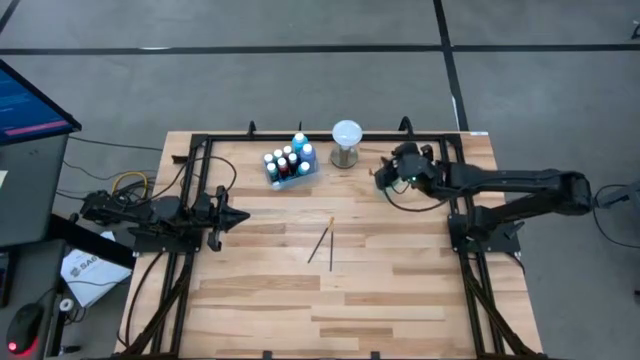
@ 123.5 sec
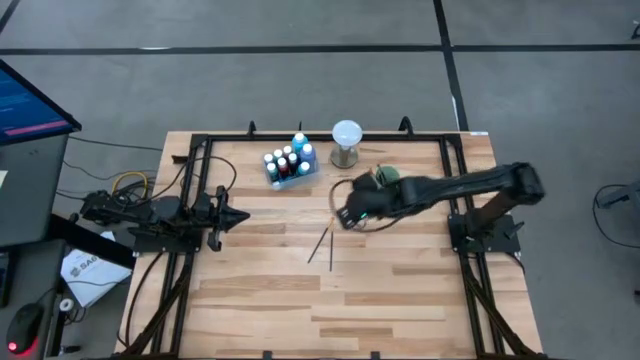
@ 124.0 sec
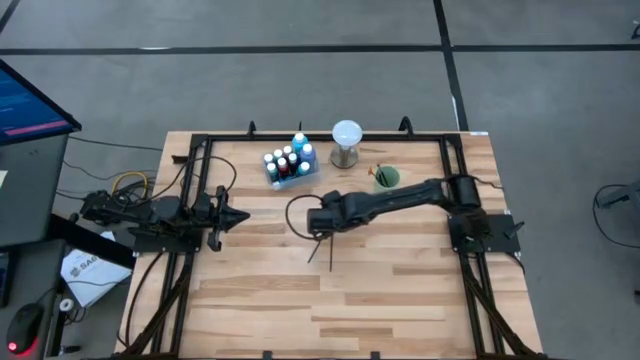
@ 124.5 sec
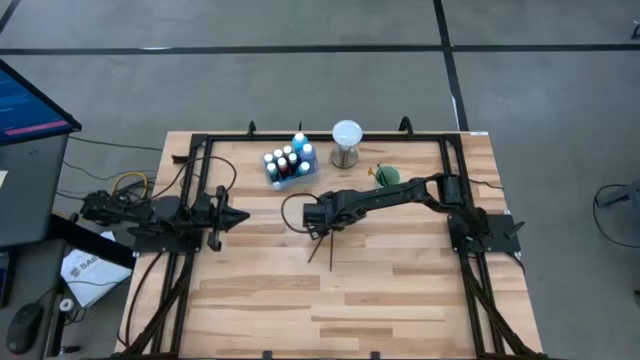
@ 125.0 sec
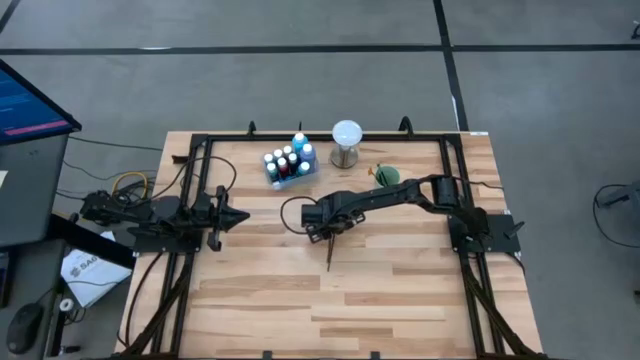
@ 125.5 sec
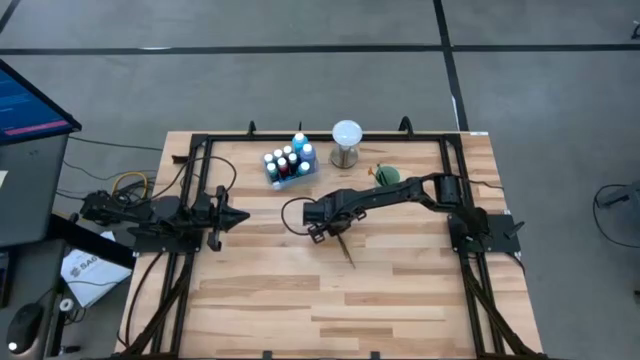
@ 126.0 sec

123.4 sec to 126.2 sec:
Task: Pick & Place Paint Supplies
Put the left gold paint brush into the cup

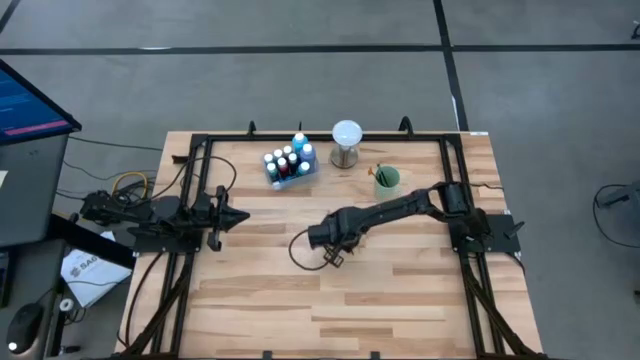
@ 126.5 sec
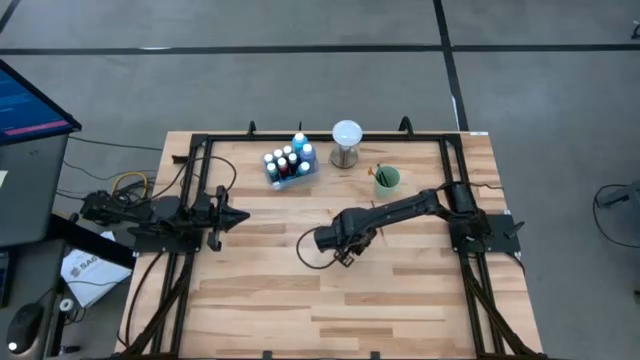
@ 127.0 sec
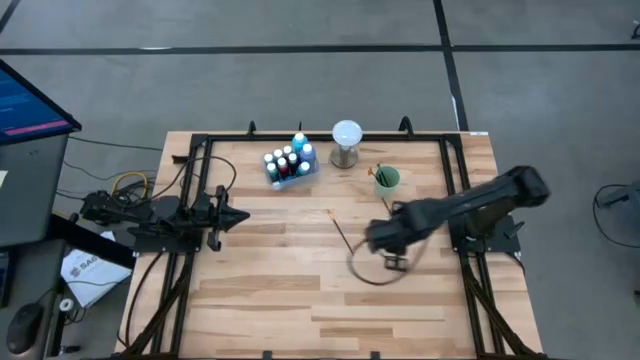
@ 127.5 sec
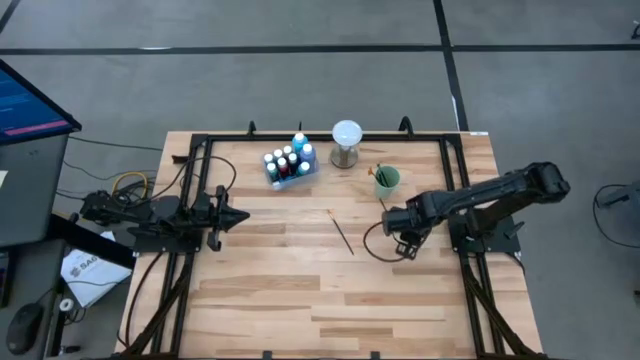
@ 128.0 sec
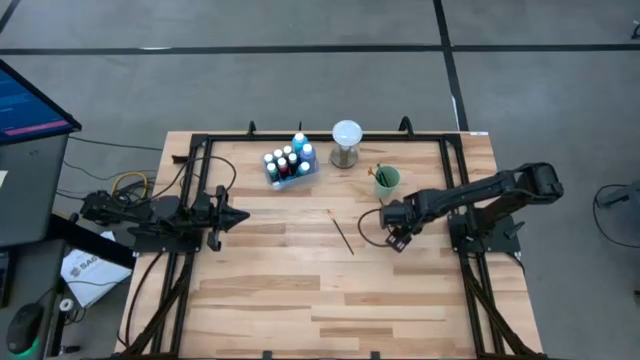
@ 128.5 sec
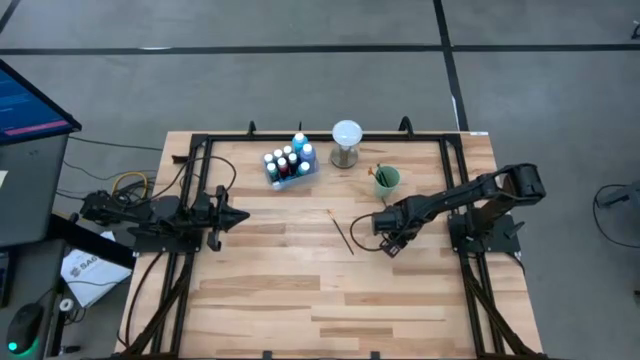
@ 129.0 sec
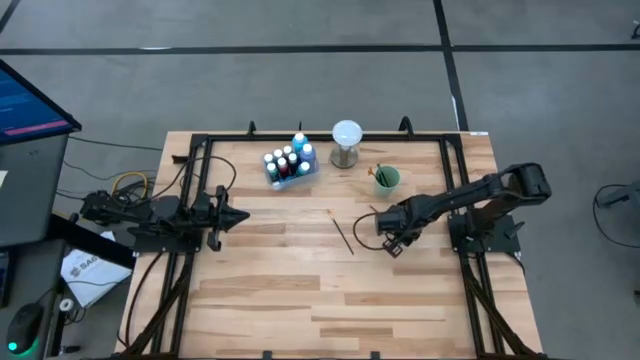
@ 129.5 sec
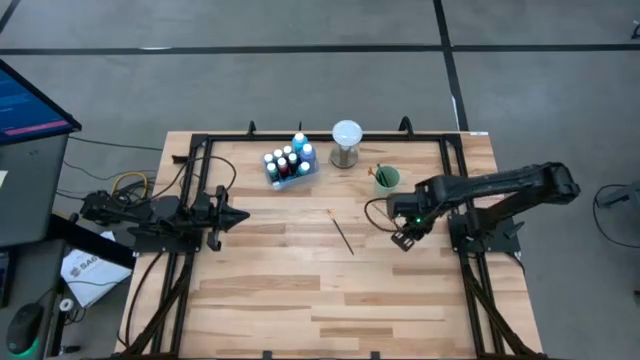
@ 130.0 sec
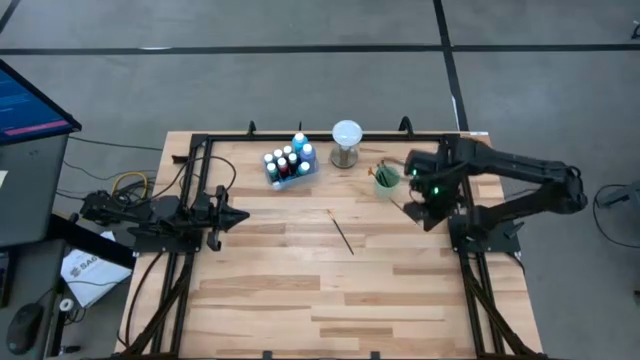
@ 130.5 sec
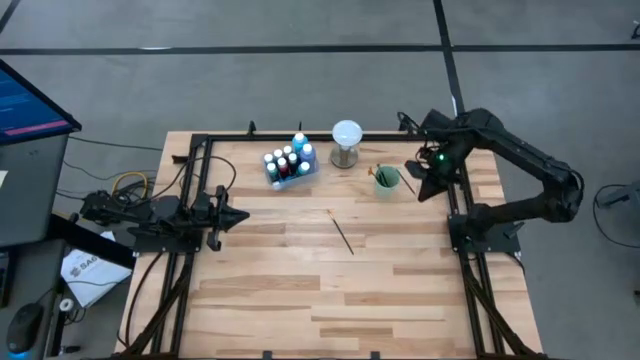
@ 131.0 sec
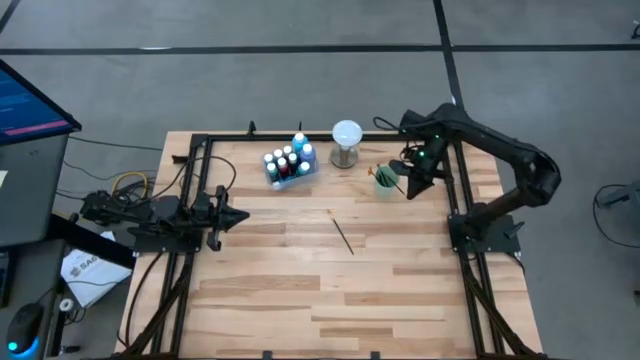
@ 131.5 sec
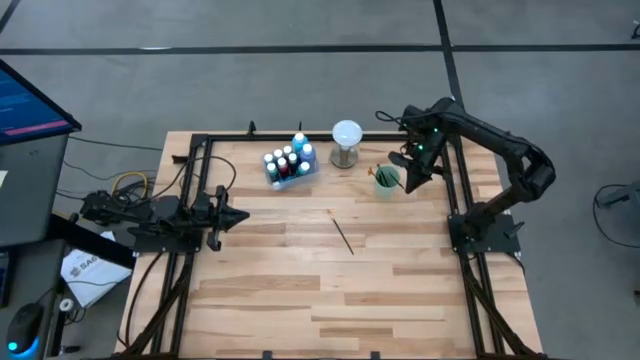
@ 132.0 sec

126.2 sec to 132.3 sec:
Put the right gold paint brush into the cup

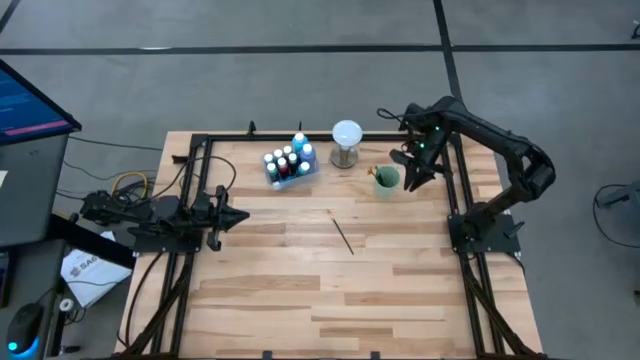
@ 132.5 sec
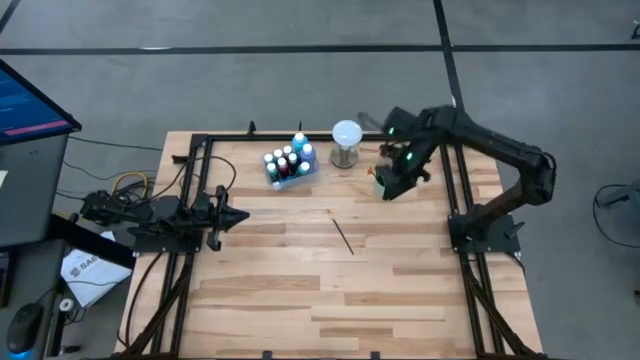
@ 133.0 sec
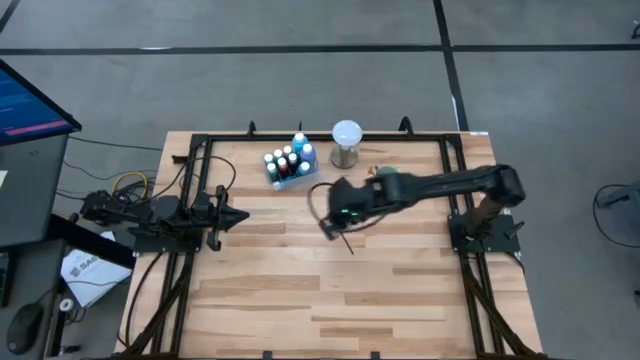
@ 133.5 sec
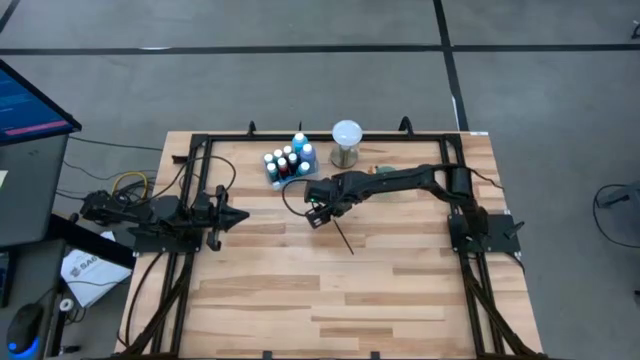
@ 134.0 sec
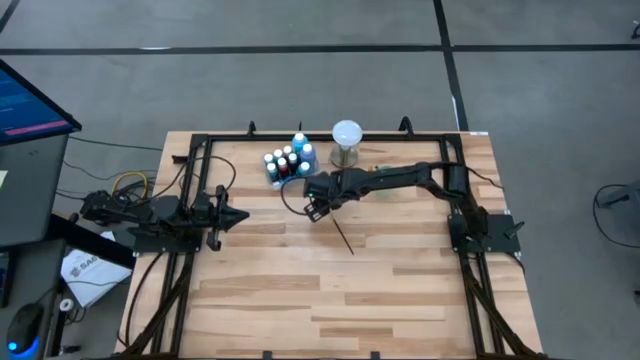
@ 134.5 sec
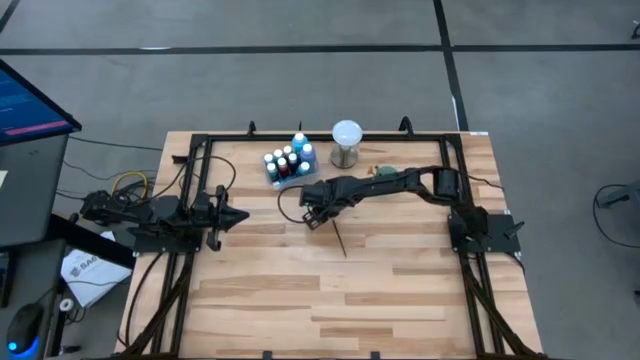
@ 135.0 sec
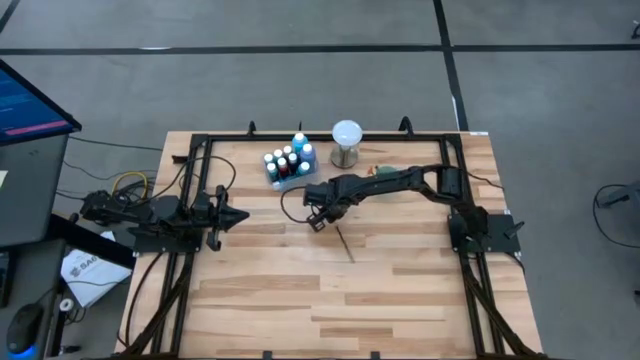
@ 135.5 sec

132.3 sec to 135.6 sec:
Put the gold paint brush into the cup

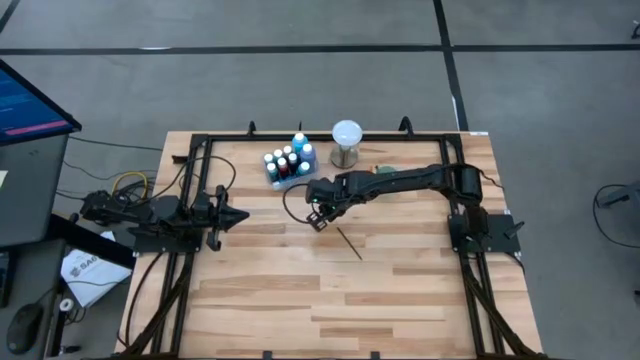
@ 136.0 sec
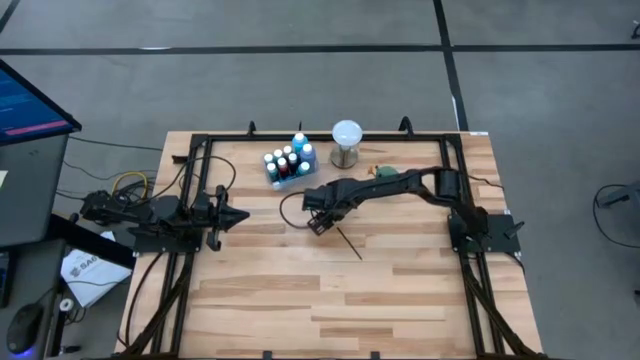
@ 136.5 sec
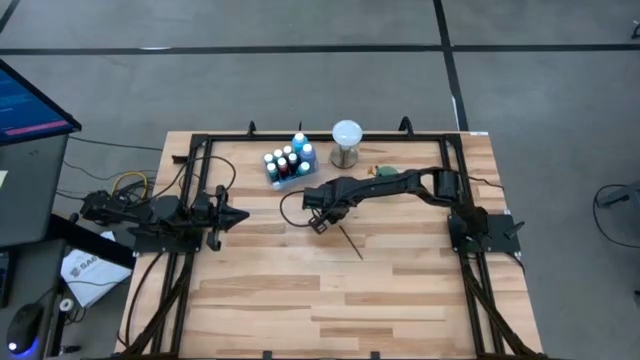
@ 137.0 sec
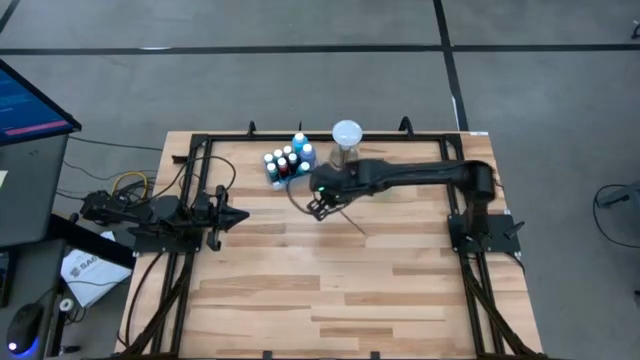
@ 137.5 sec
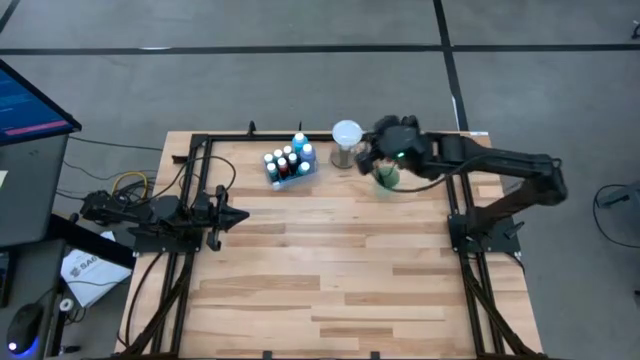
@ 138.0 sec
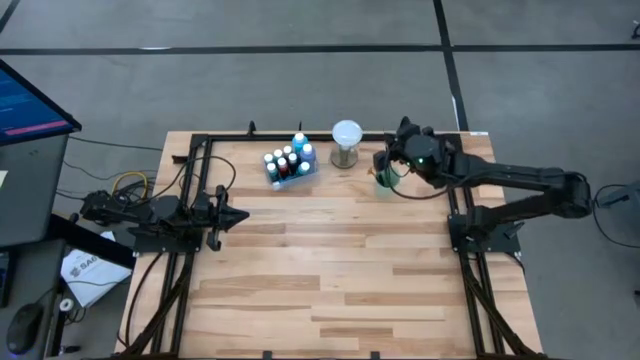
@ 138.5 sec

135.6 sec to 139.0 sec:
Put the gold paint brush into the cup

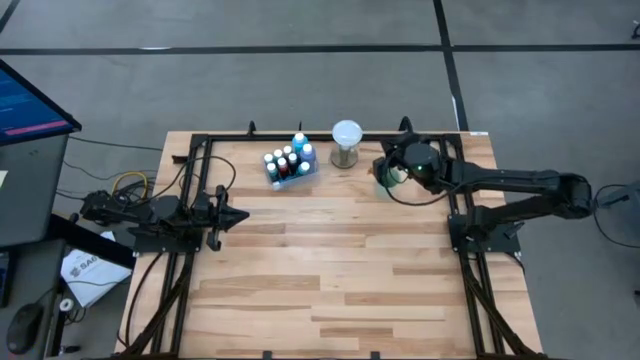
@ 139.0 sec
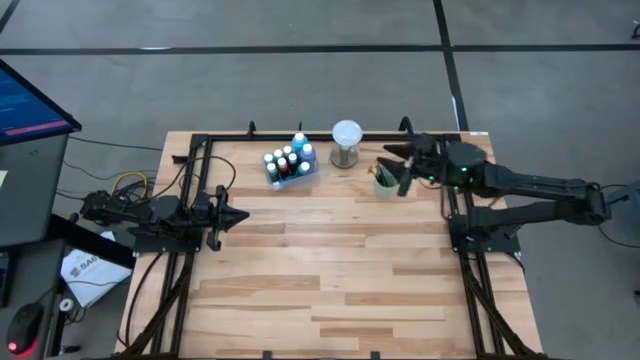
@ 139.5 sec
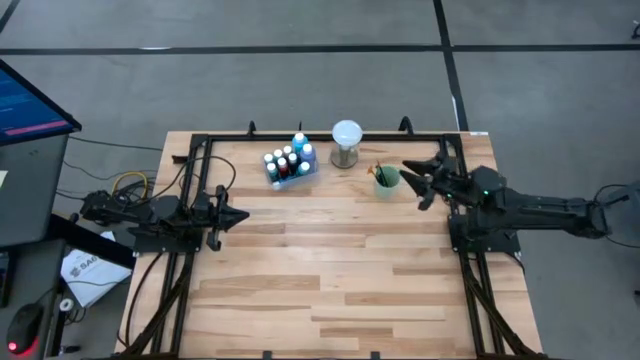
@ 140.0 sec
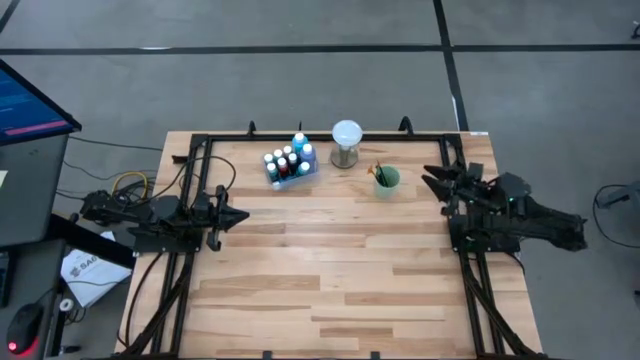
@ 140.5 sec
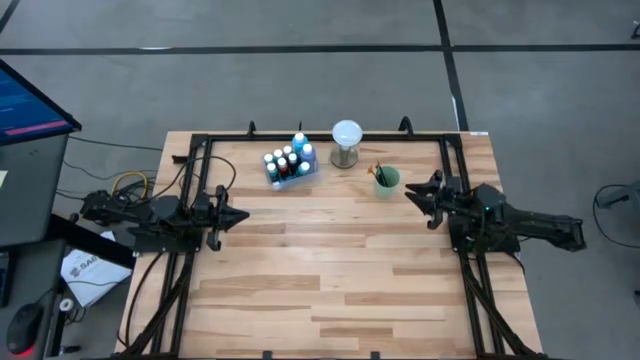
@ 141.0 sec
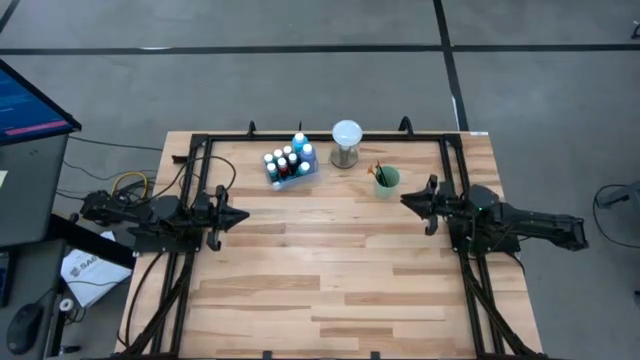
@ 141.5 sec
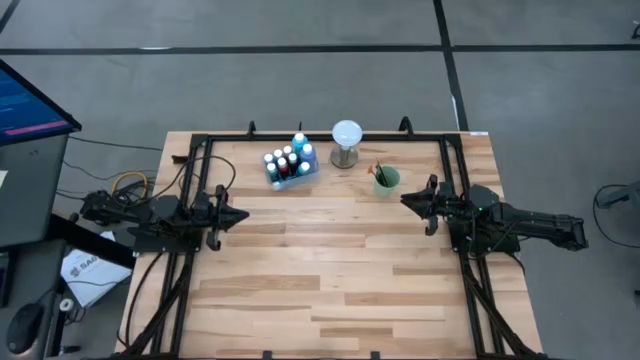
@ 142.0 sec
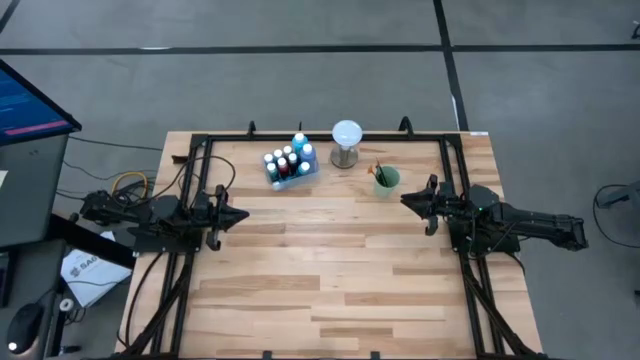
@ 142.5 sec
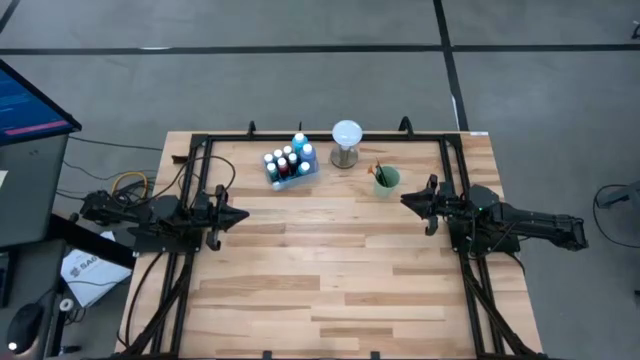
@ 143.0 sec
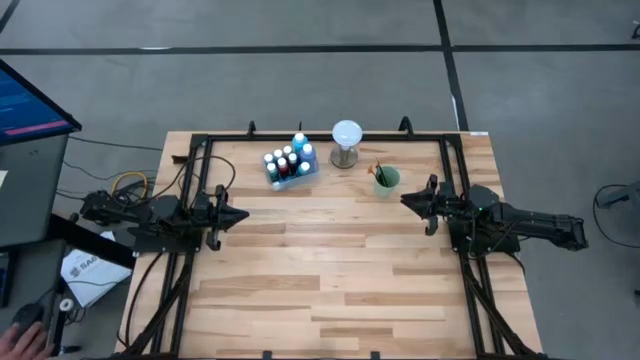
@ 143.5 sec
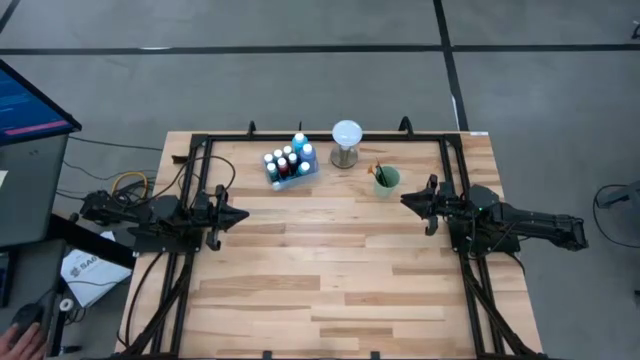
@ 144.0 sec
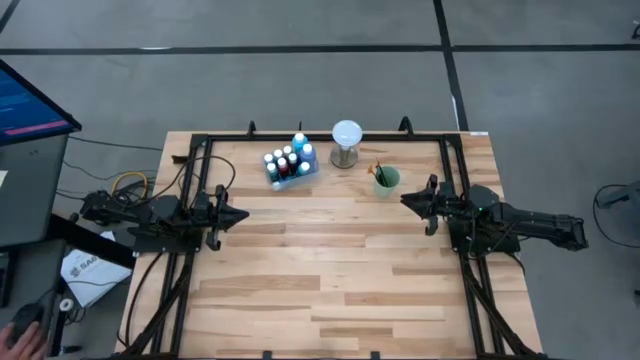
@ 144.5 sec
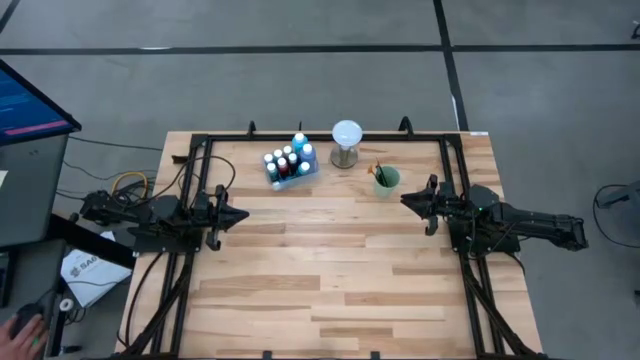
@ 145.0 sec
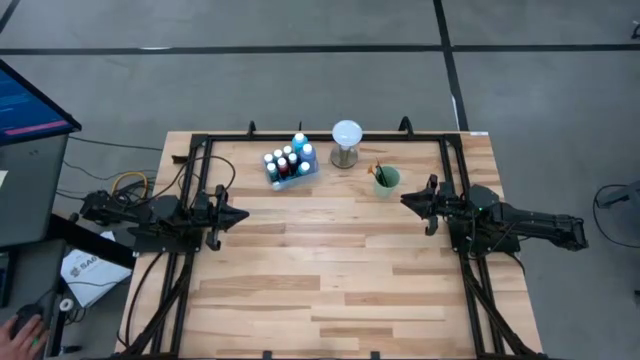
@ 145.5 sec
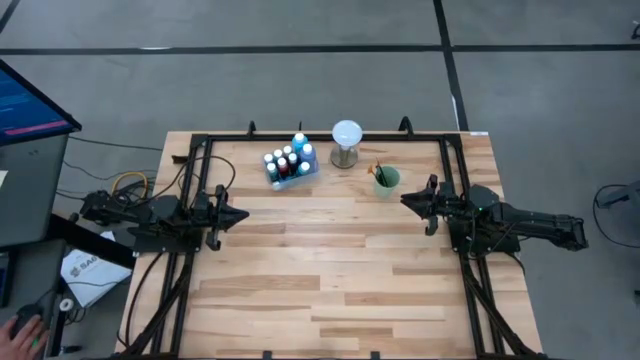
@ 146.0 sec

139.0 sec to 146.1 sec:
Return to Home Position
